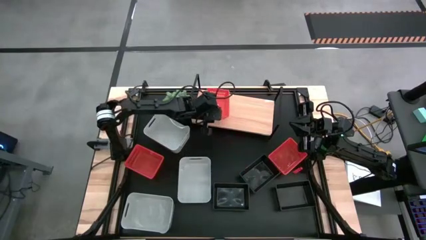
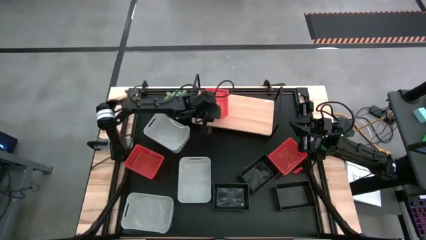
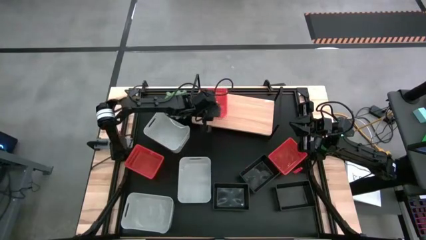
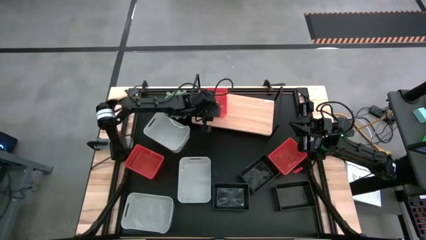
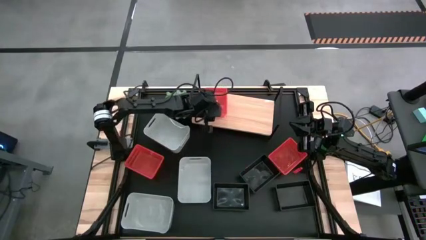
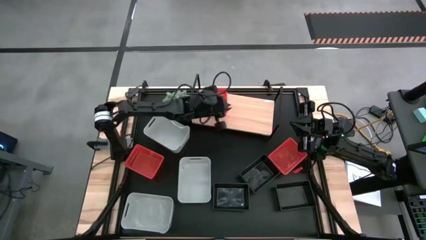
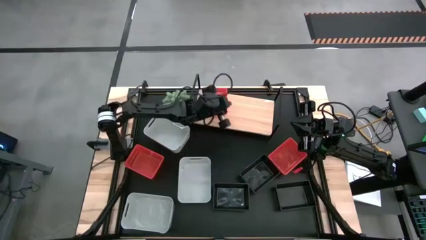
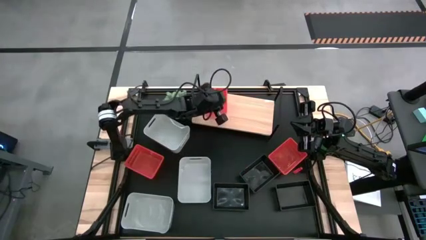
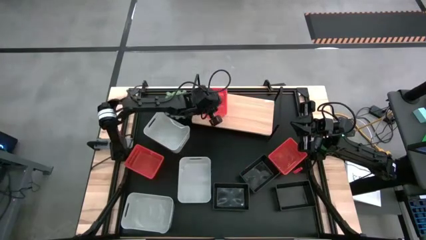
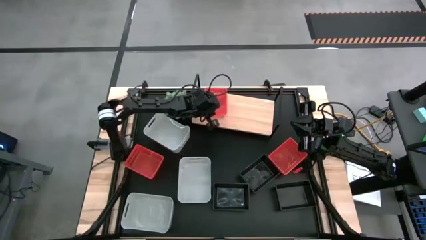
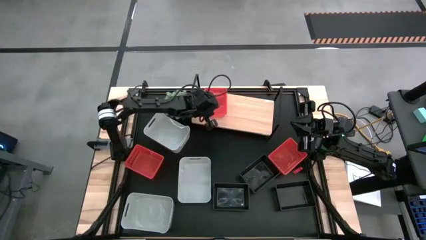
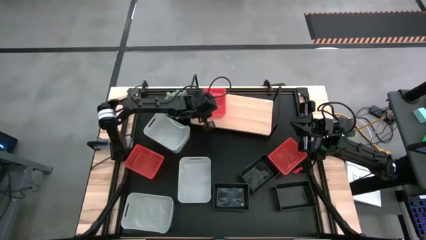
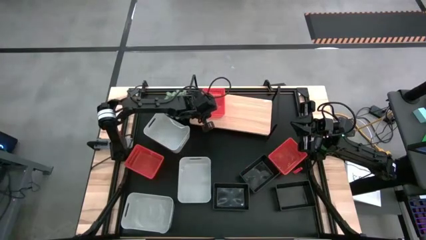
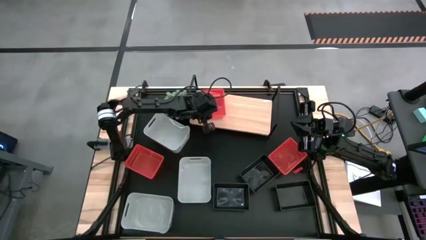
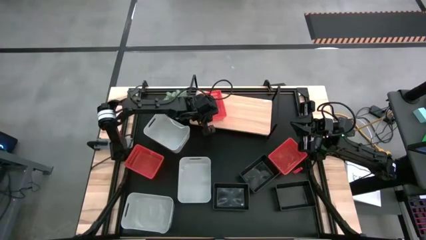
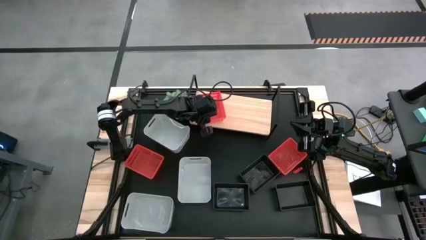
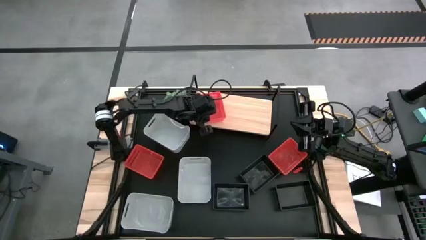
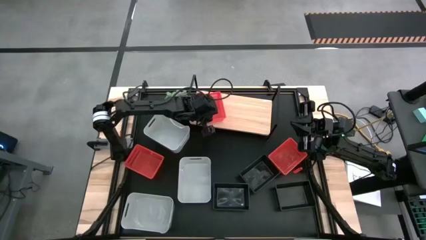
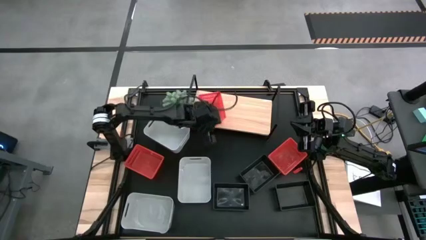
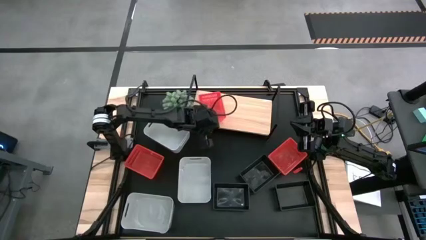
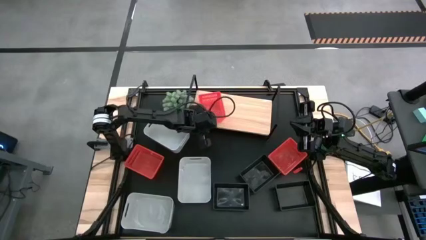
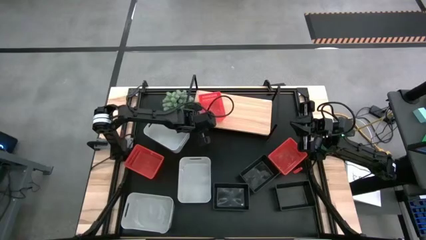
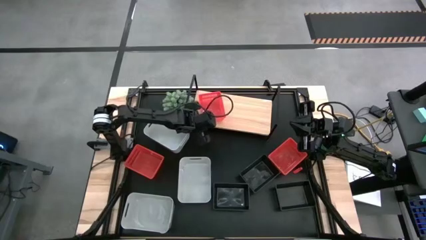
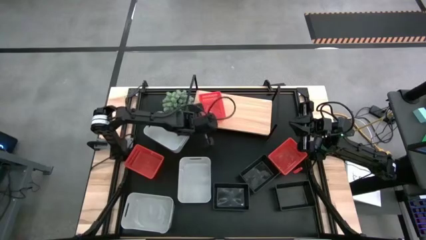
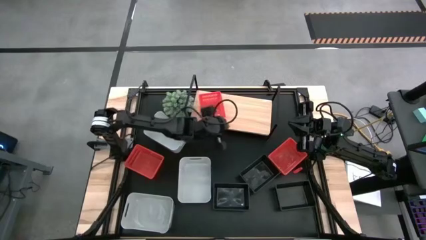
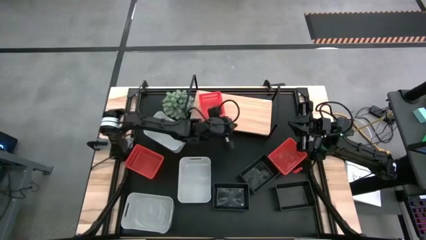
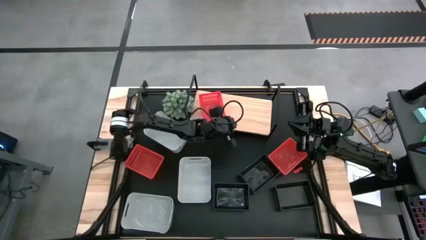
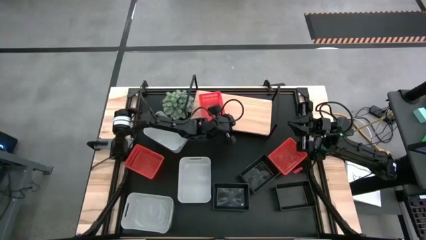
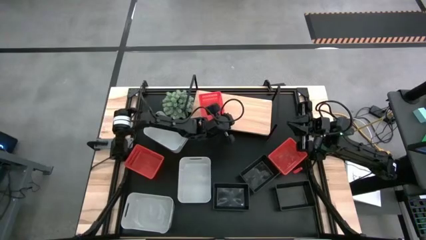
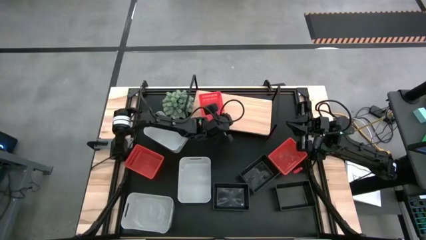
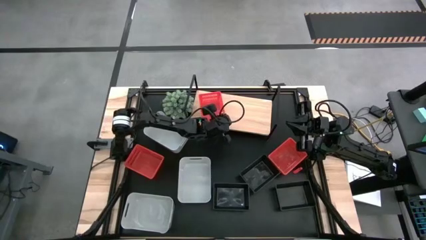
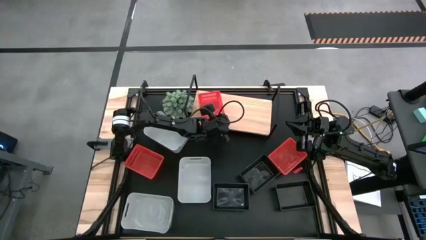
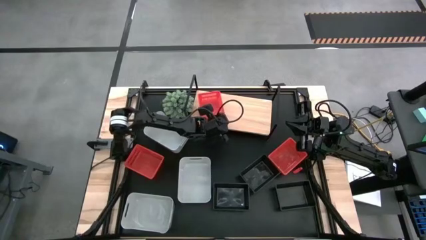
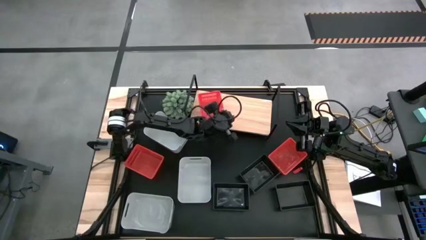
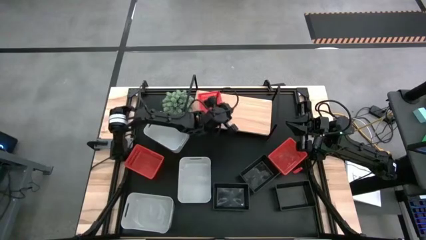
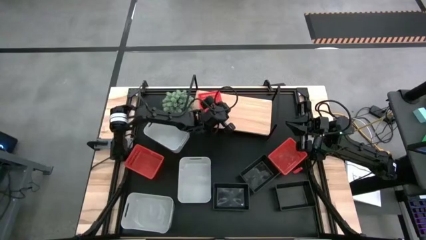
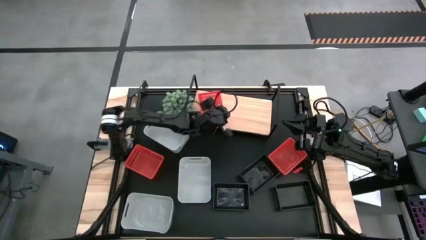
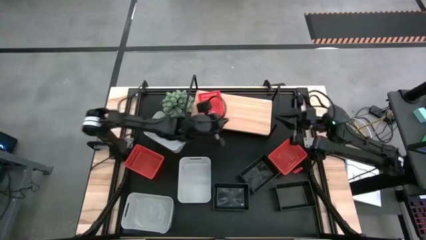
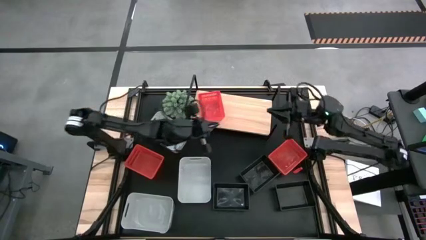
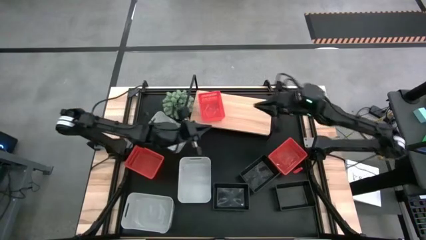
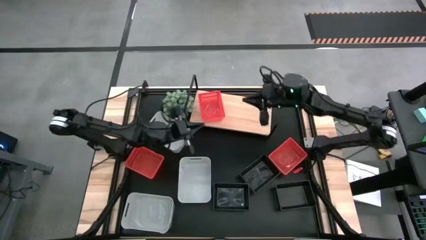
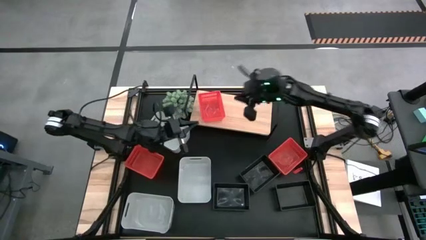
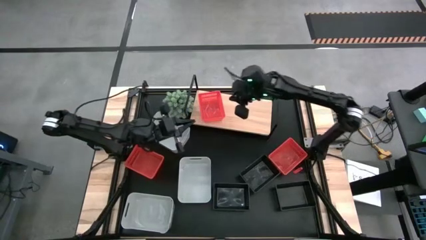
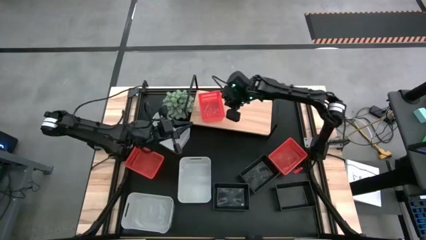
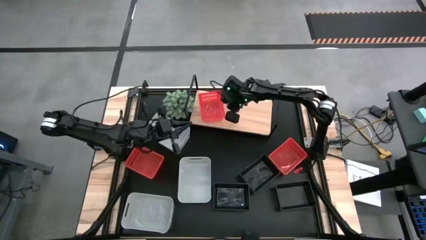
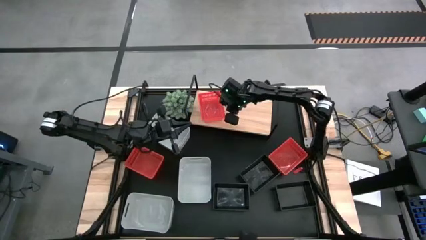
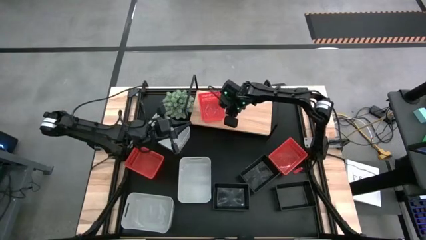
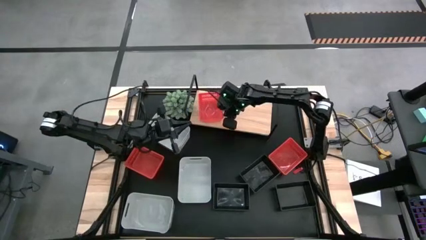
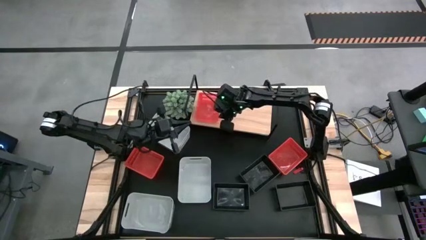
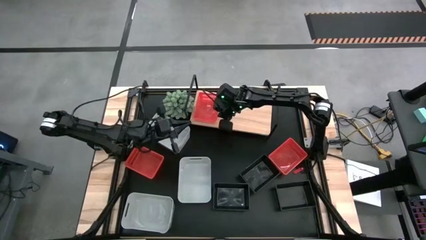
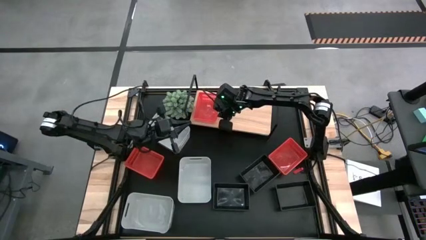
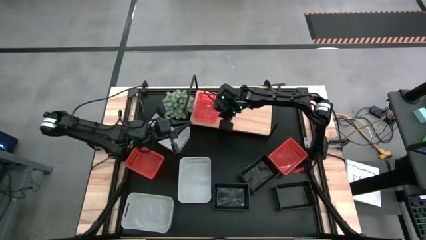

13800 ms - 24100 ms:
Task: Stack baskets on shelf by color
Put the middle red basket on the shelf

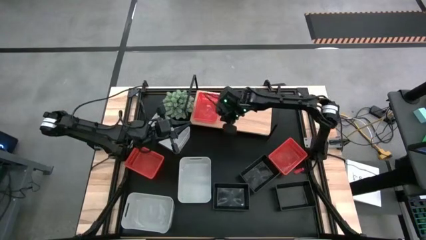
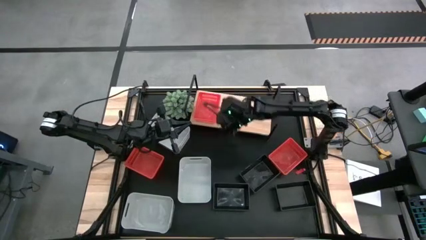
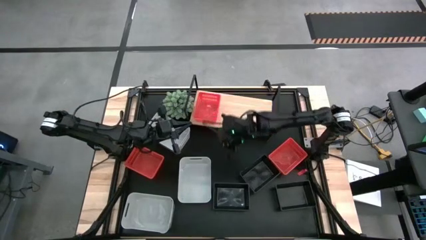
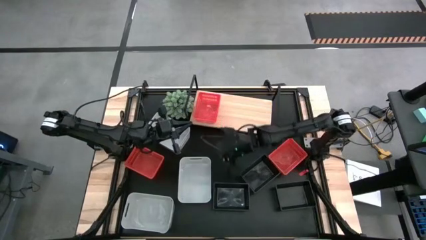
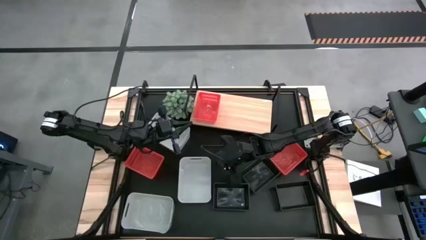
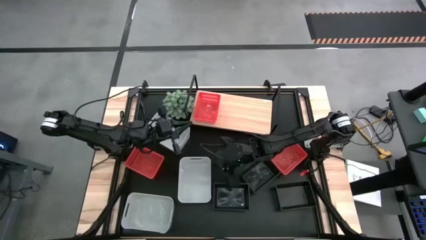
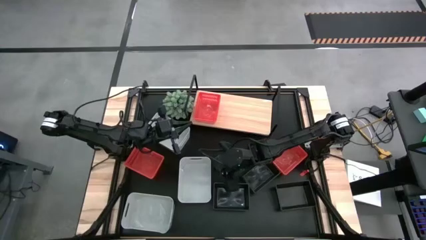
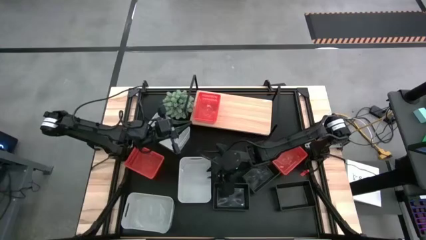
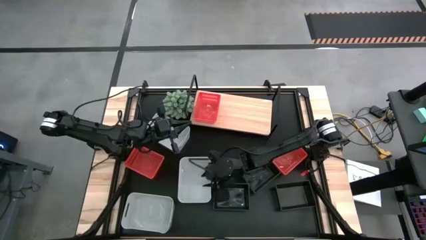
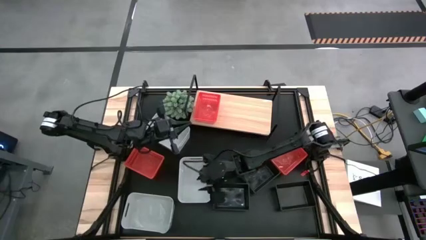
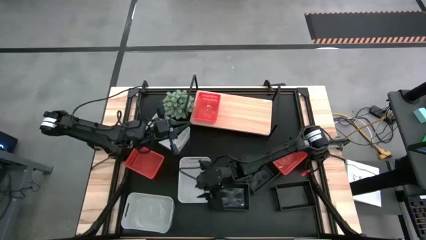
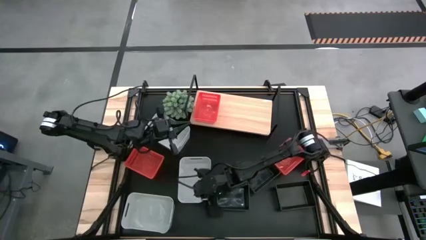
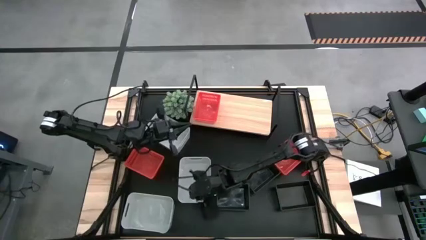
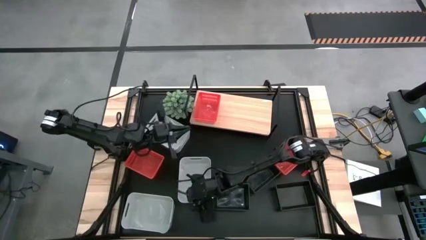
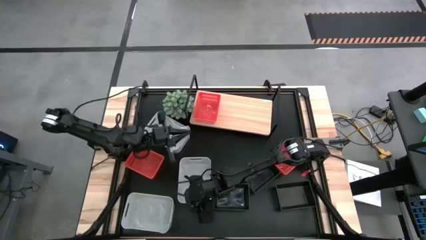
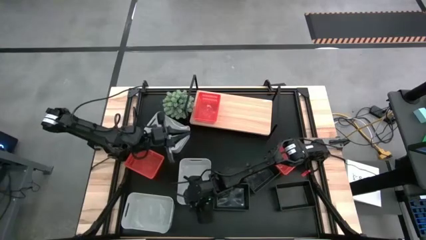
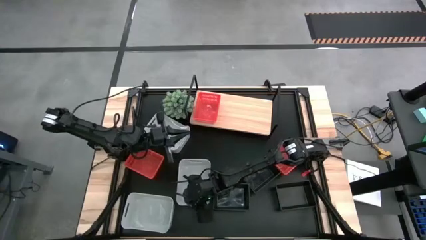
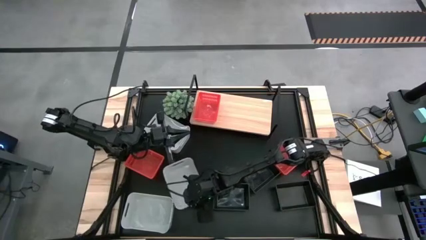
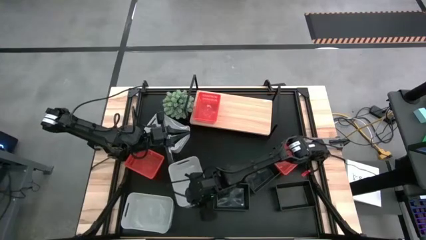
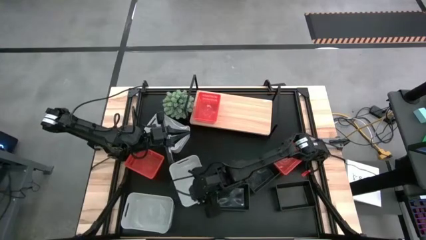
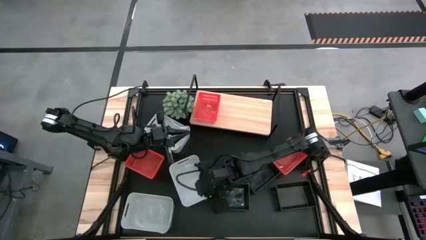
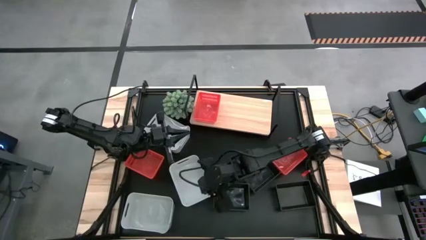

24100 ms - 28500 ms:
Put the middle white bin on the shelf
